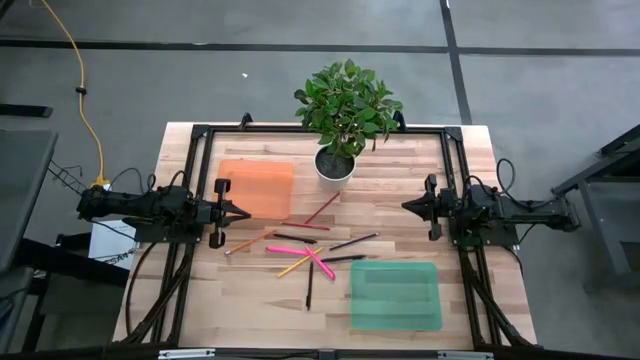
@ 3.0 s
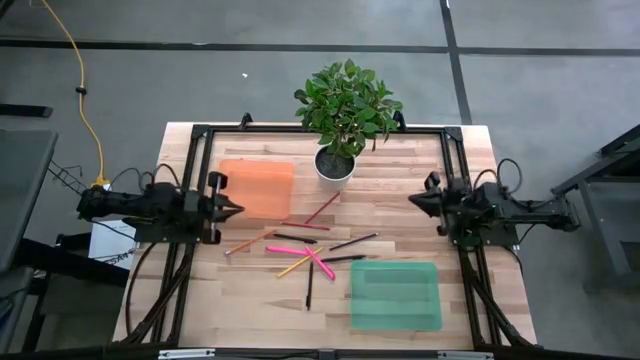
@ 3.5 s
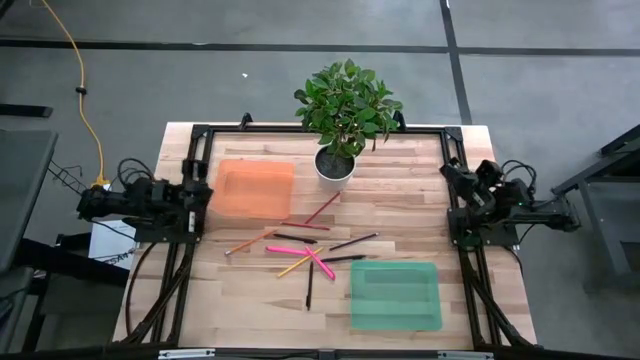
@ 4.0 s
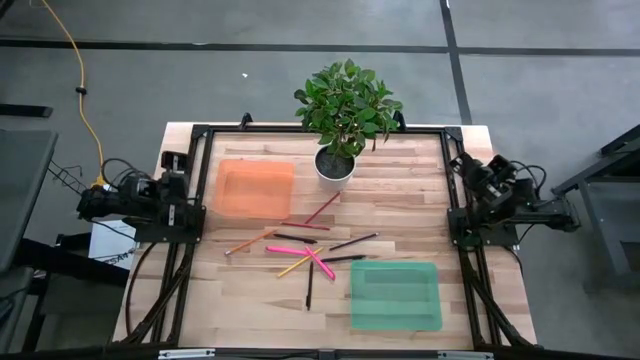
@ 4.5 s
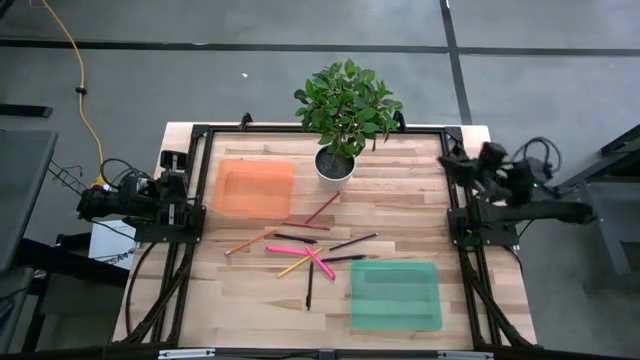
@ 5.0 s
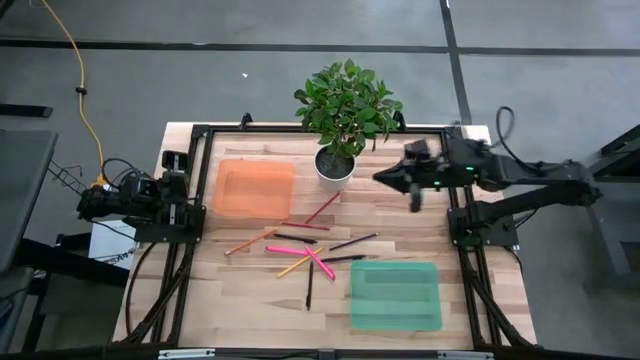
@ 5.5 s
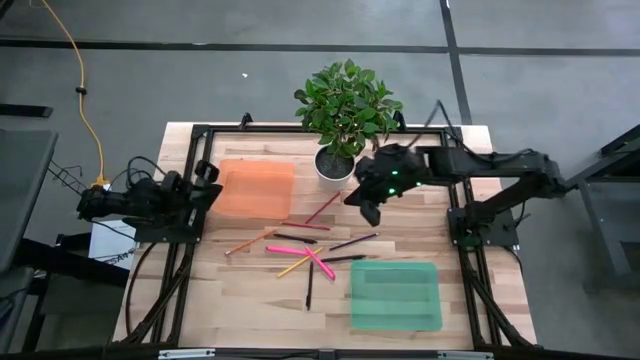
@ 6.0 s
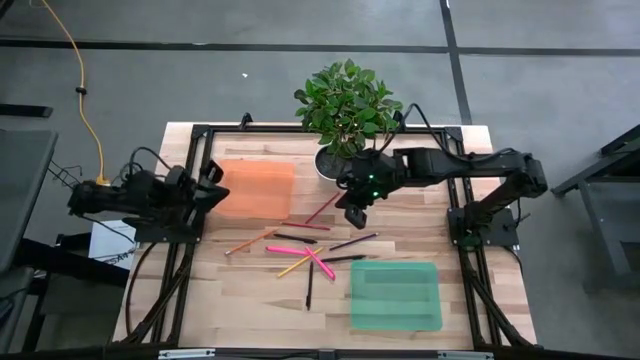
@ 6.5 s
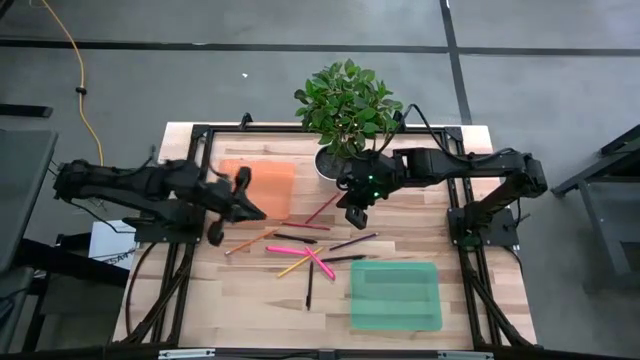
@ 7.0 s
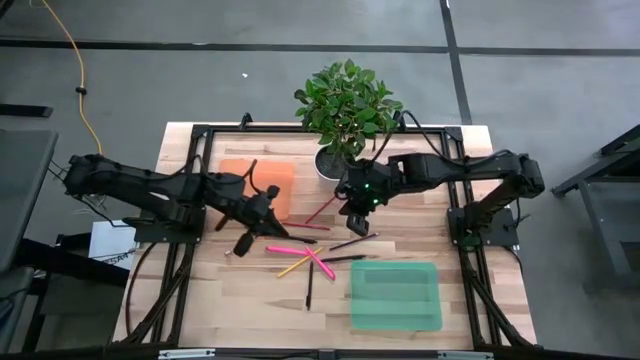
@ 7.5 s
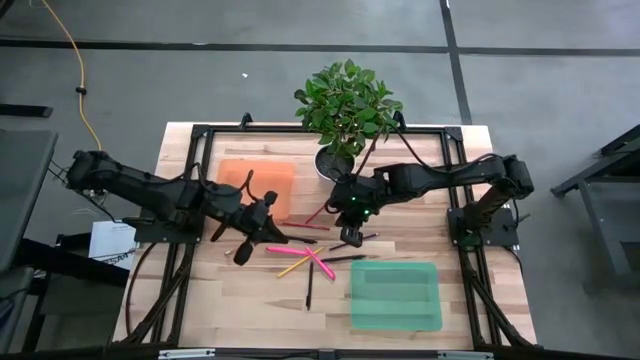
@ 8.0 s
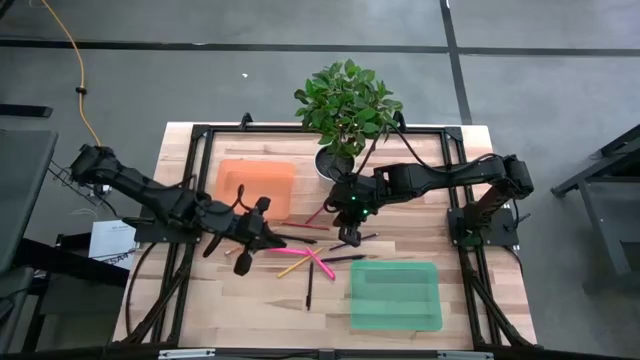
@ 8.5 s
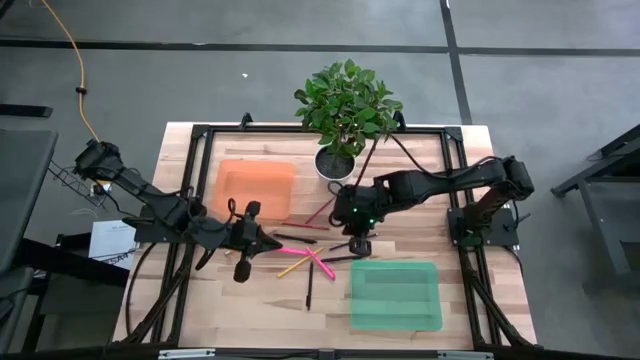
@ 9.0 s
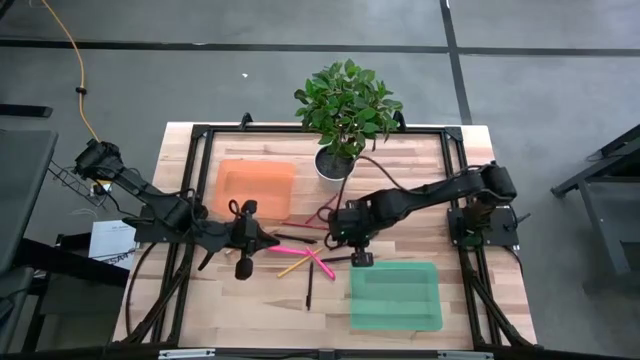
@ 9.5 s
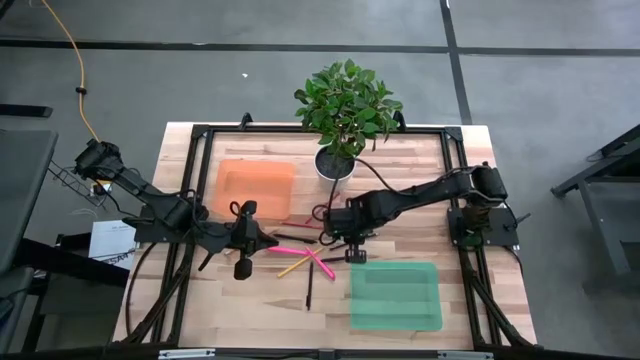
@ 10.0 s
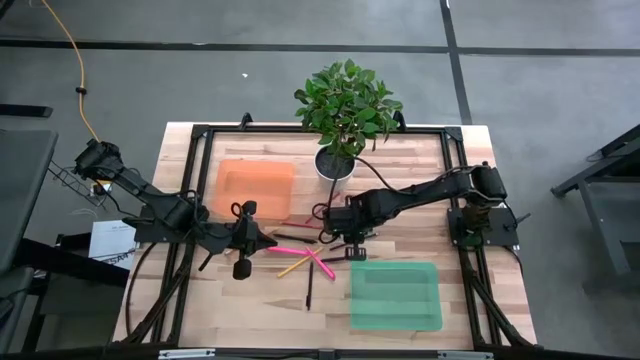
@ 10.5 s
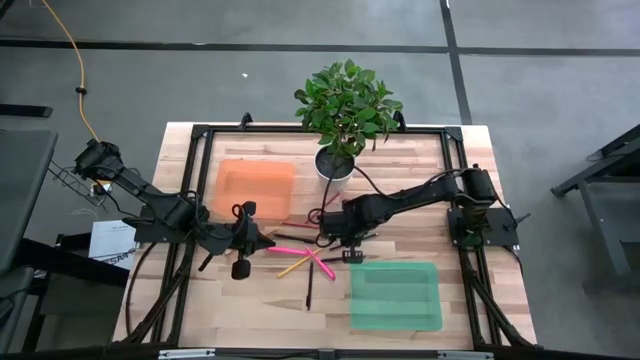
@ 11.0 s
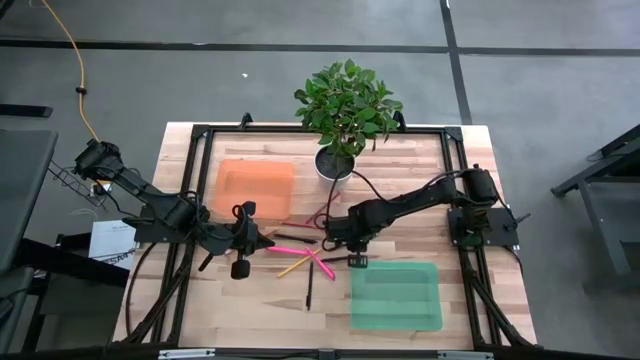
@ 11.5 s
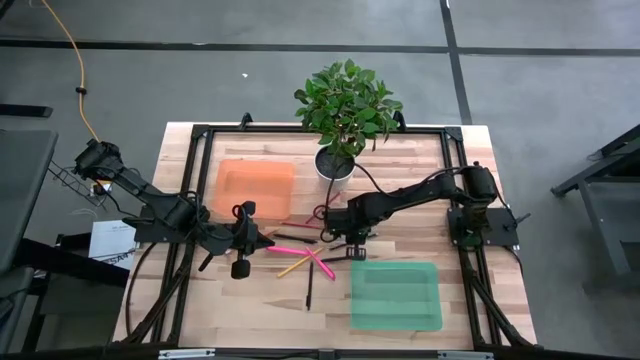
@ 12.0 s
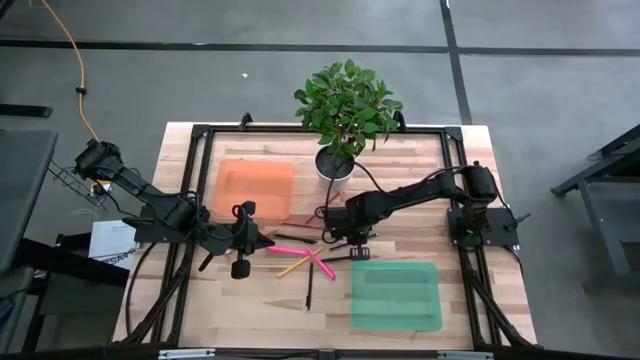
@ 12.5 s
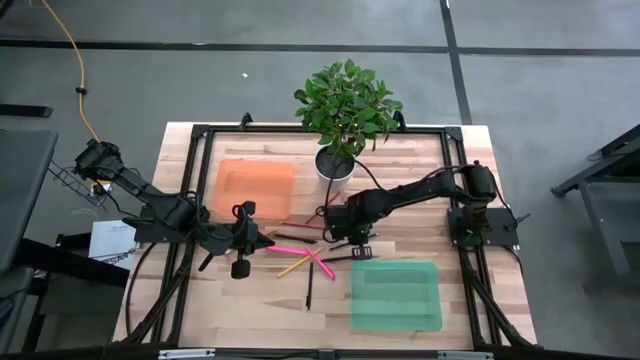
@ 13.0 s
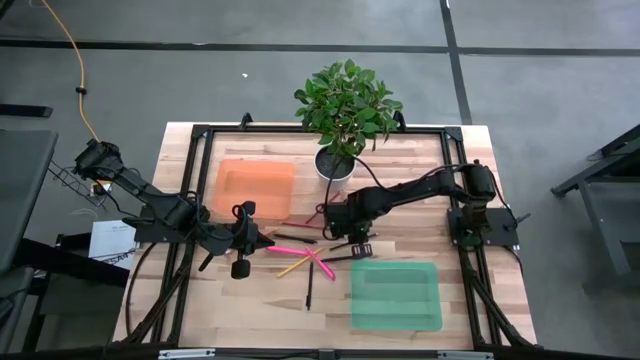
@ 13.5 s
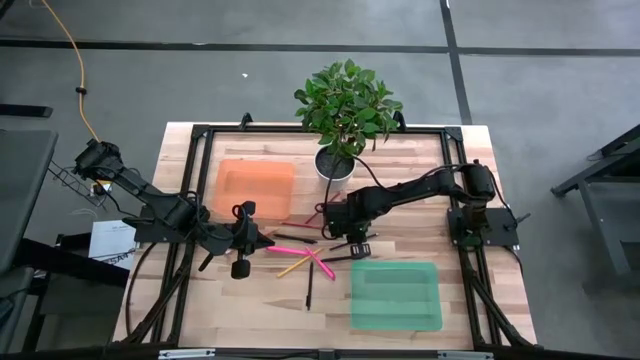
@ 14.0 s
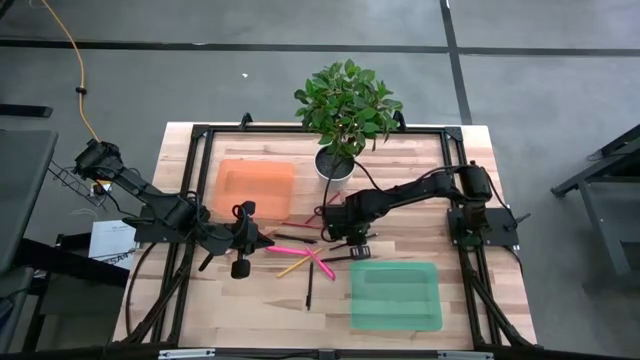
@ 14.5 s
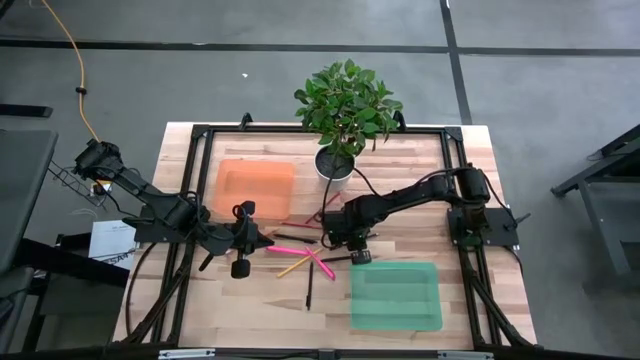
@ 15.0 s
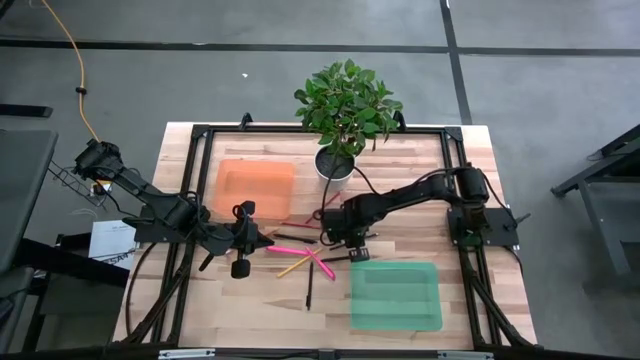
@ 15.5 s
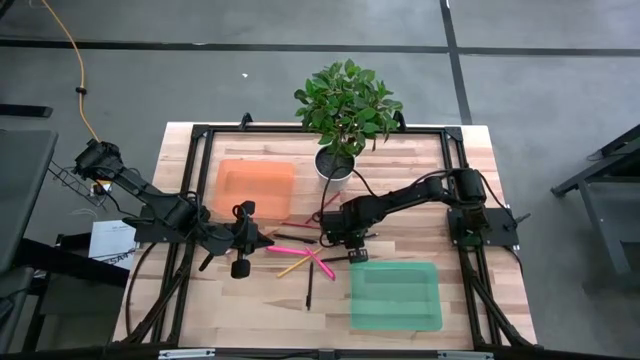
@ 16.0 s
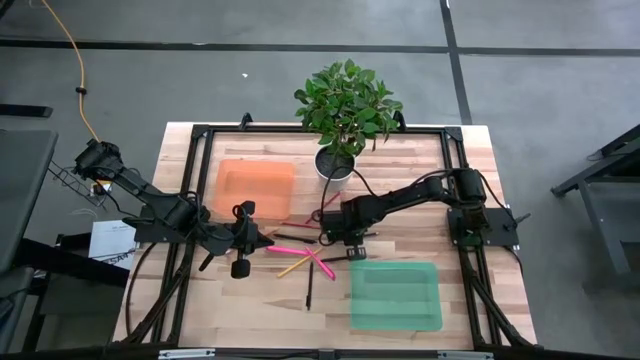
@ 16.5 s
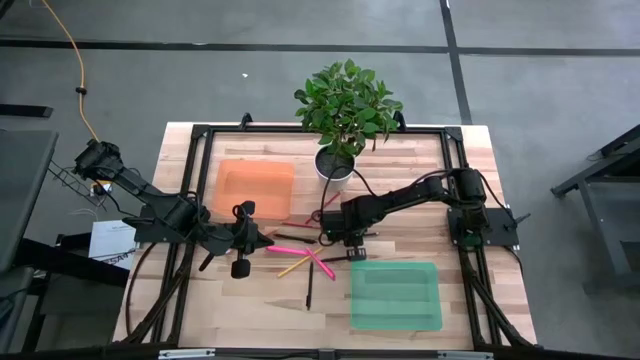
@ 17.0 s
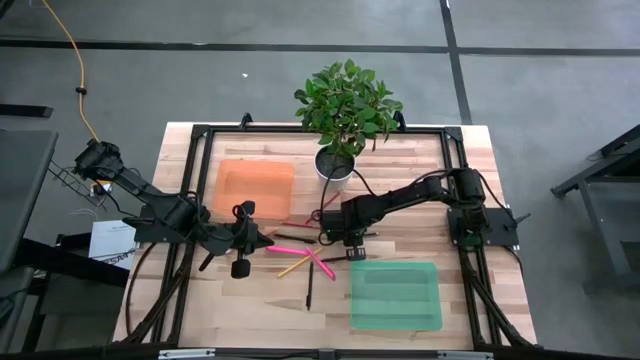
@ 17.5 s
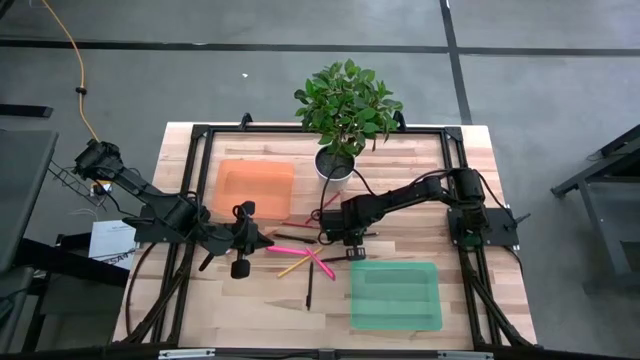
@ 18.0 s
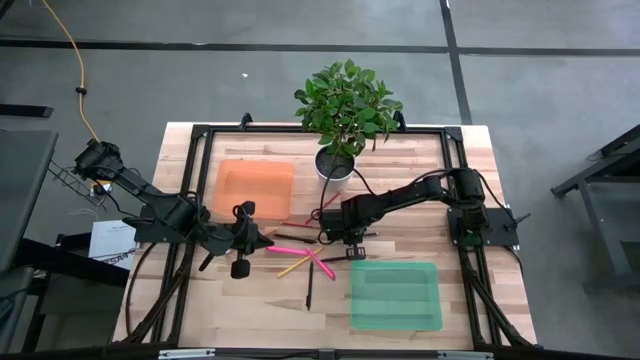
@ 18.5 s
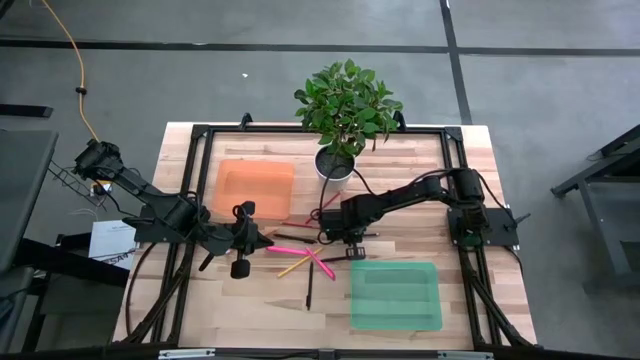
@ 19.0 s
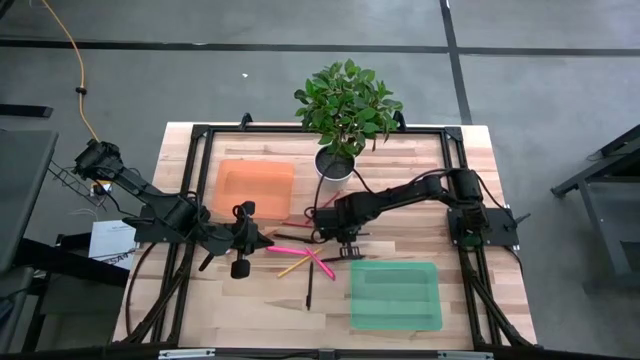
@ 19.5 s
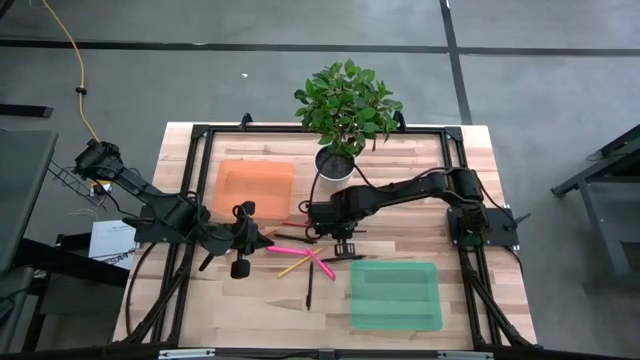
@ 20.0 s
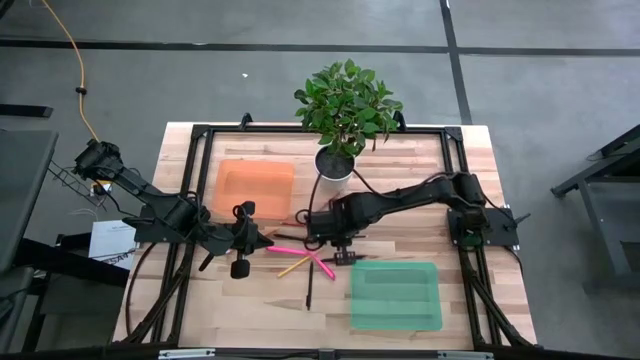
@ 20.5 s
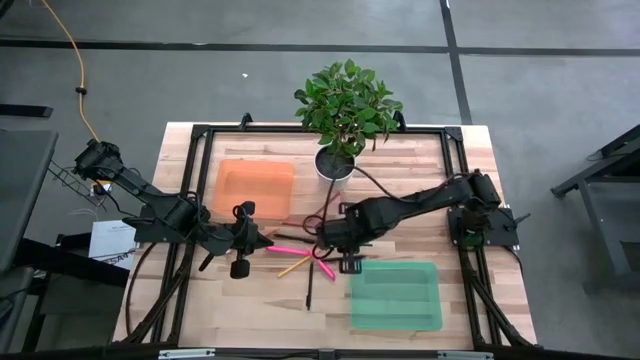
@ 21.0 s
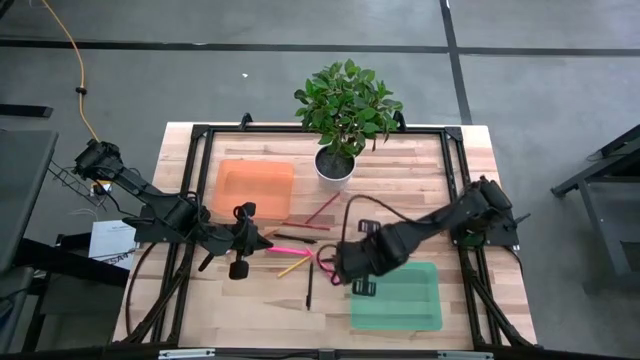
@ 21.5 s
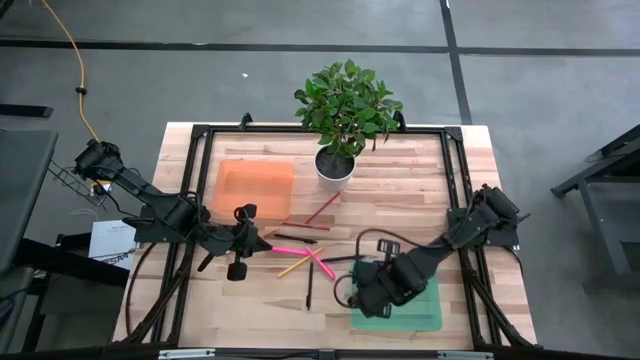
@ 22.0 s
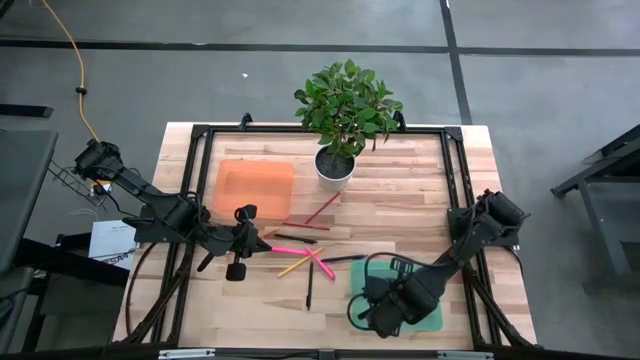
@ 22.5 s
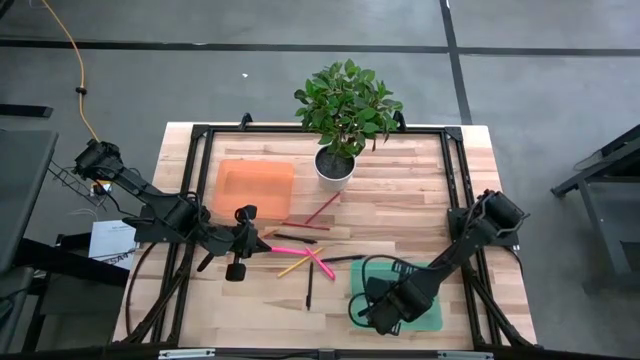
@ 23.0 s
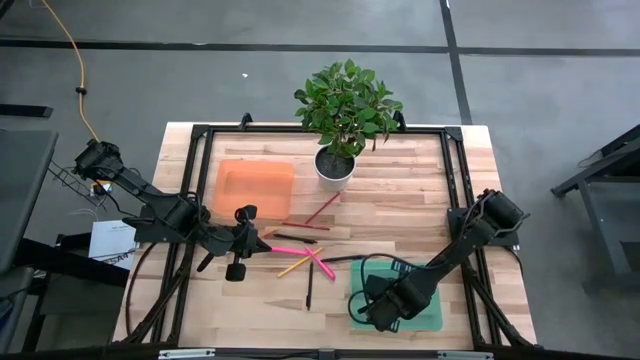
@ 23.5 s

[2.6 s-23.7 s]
Task: Sort pens & pencils
Put the blue colored pencil into the green bin
